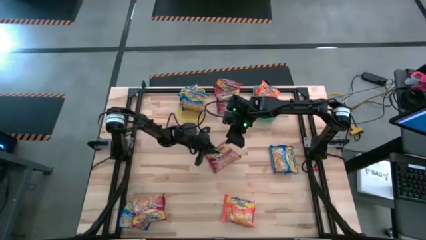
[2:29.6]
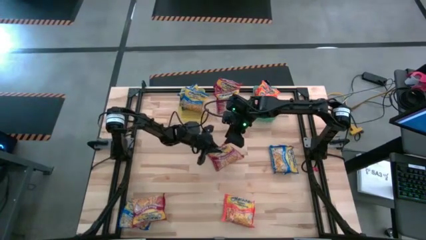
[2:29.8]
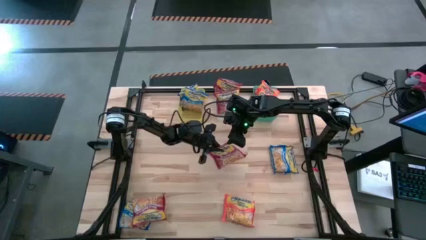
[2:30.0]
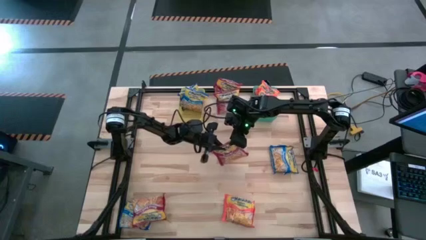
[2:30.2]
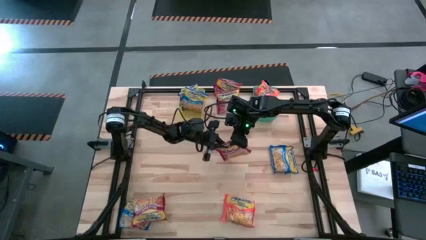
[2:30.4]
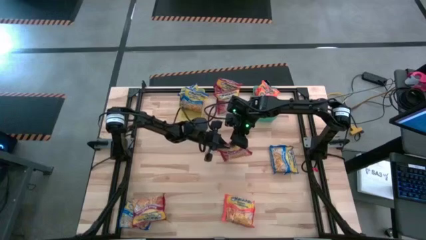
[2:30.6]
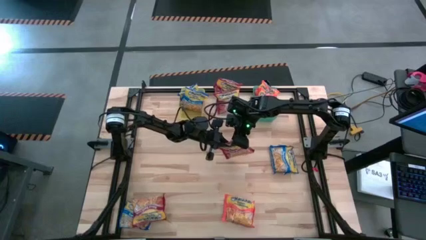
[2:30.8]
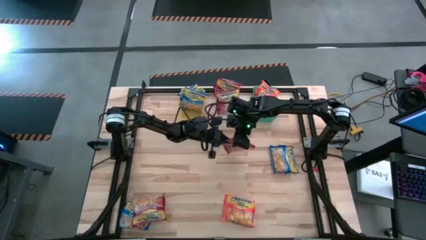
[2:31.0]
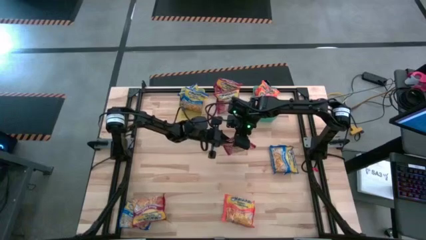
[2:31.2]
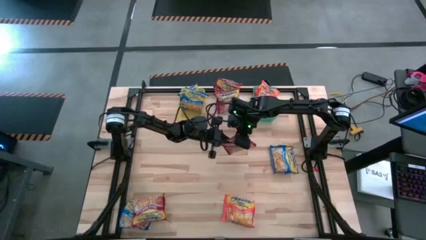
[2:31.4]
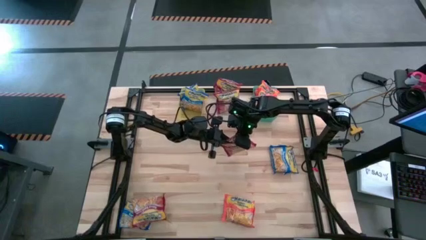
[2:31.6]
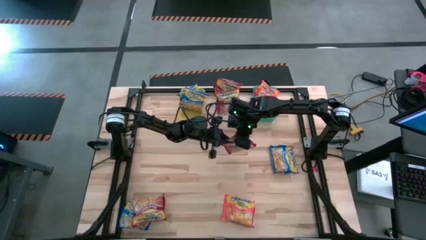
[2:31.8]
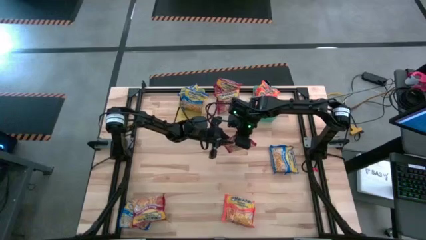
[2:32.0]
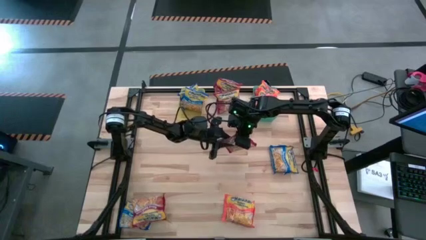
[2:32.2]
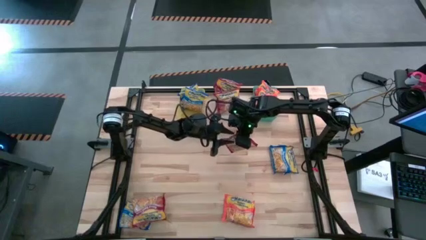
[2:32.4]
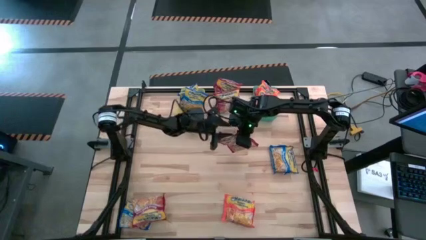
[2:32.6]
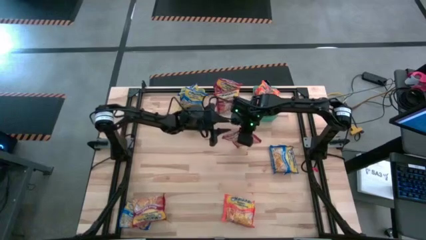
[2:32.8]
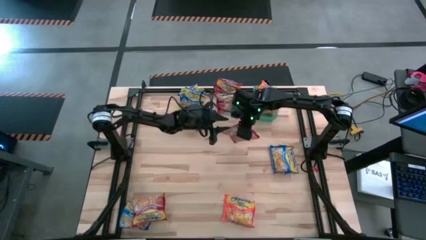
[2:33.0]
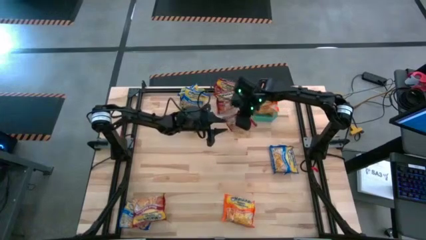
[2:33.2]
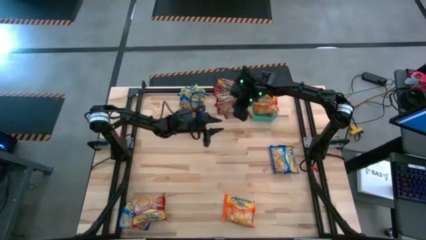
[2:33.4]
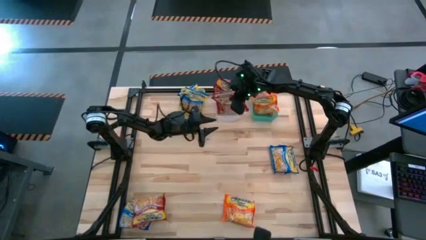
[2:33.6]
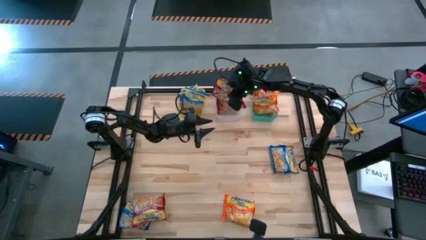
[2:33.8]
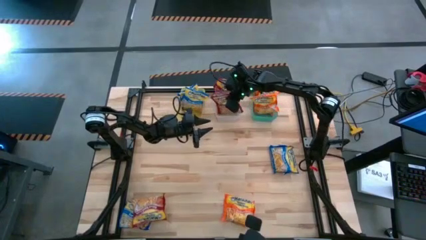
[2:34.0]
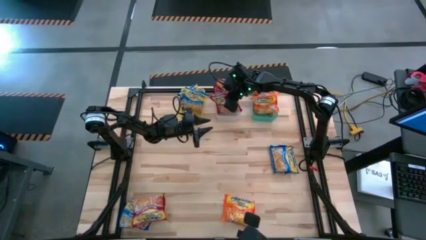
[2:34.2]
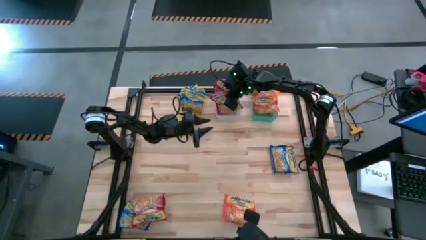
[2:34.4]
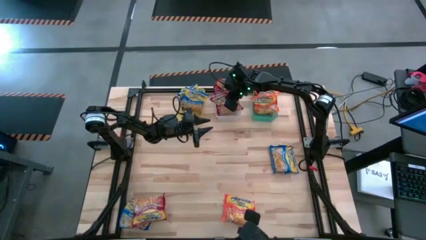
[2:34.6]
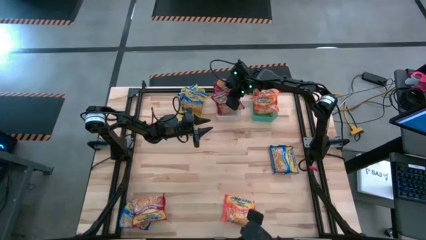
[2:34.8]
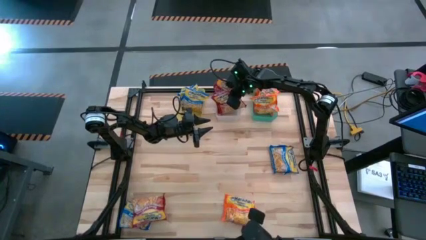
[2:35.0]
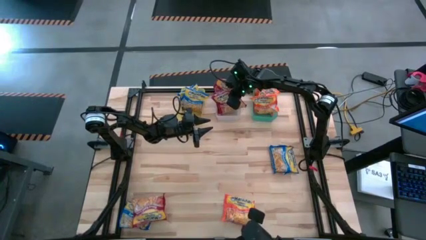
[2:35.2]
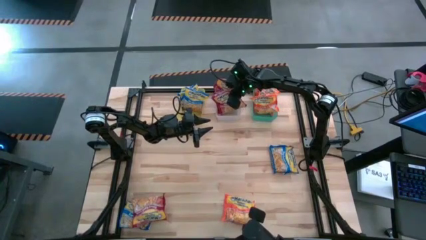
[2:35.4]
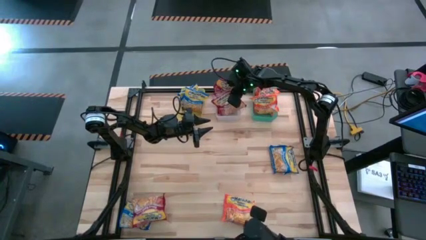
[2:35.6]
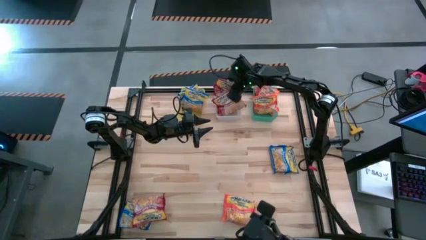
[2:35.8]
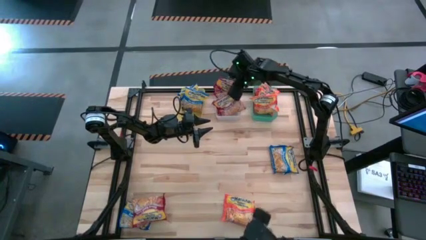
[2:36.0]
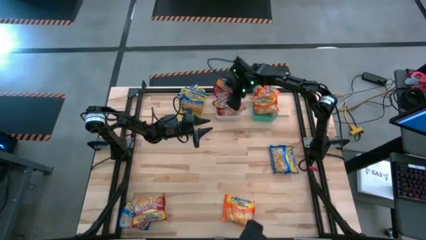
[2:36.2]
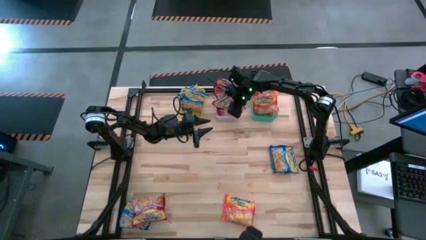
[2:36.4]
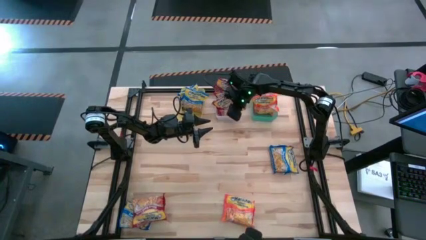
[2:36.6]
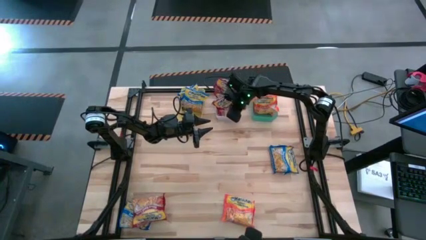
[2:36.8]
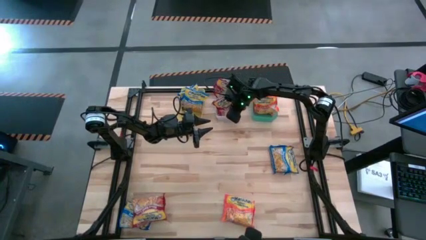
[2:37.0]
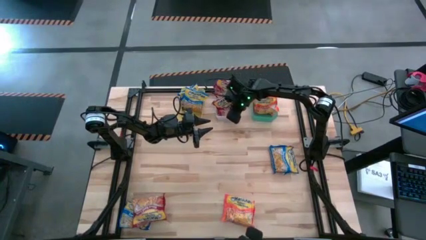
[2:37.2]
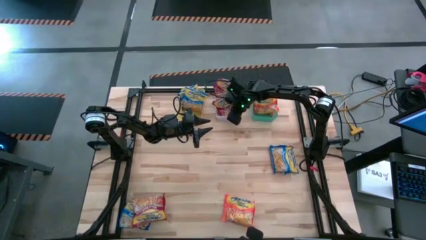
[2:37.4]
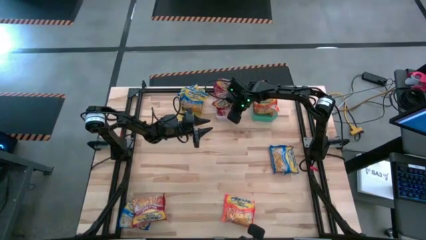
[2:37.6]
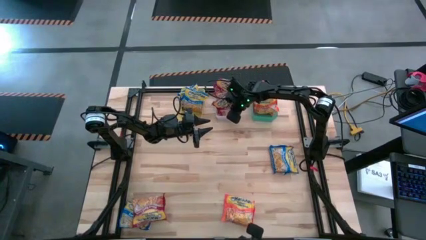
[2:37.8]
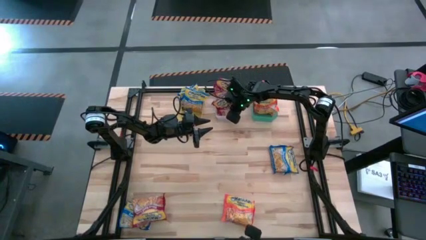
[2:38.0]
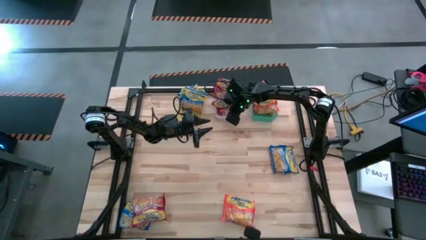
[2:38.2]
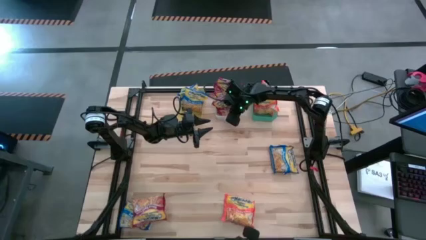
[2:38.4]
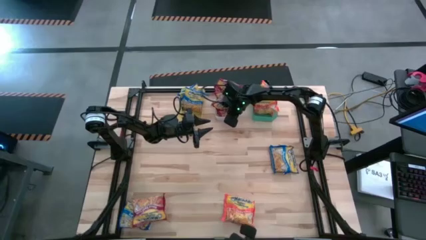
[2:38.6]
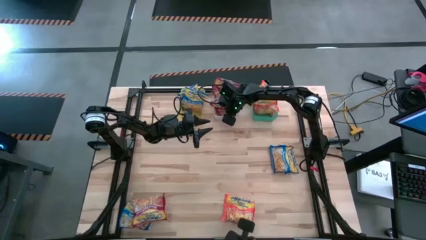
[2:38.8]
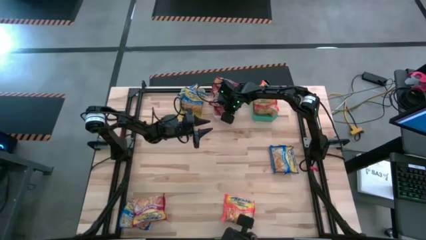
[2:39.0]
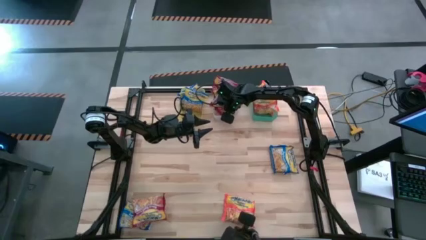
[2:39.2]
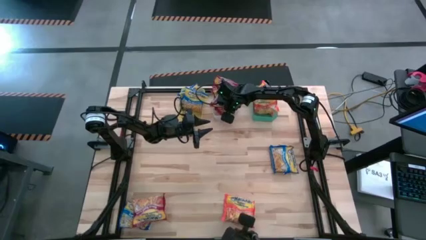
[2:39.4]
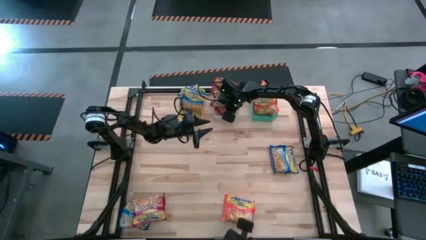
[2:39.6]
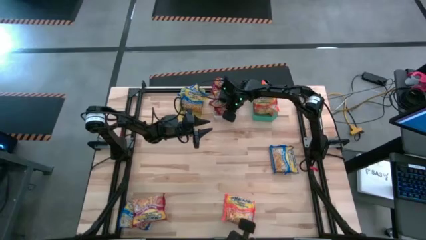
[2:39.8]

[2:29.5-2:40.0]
Task: Sort Maruchan noodles
Put the right red noodle pack into the white bin

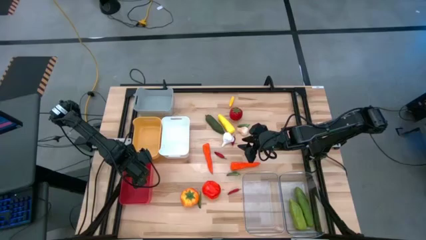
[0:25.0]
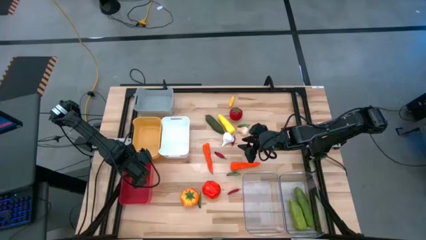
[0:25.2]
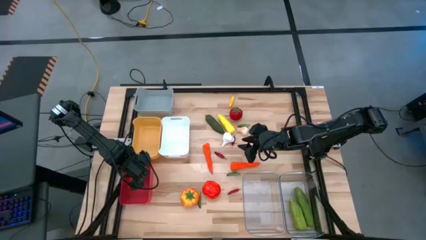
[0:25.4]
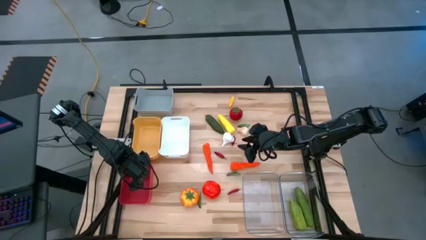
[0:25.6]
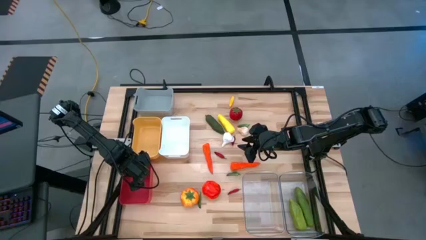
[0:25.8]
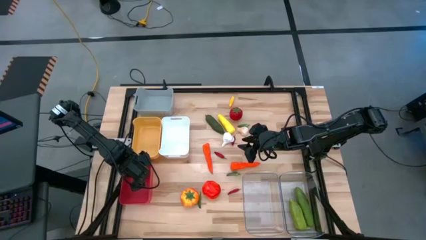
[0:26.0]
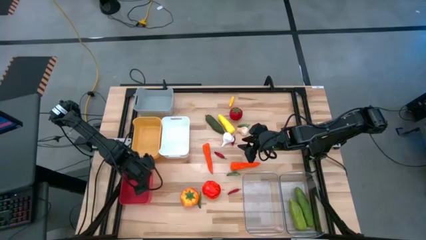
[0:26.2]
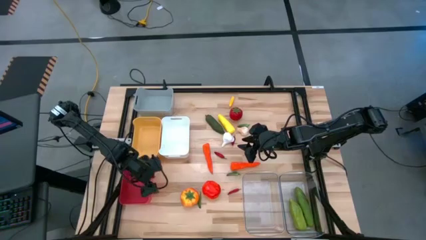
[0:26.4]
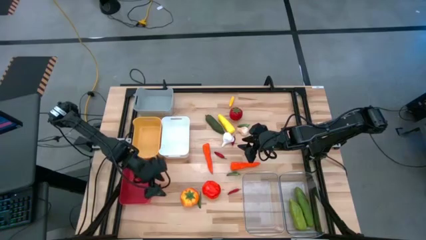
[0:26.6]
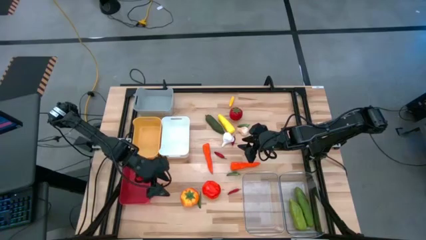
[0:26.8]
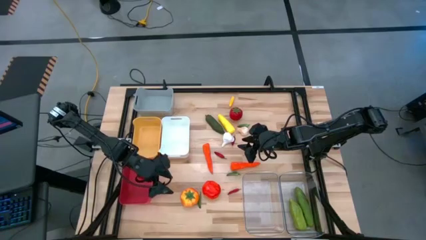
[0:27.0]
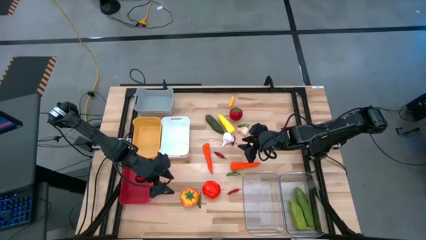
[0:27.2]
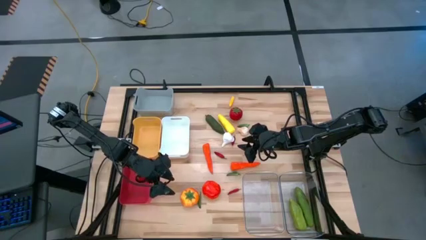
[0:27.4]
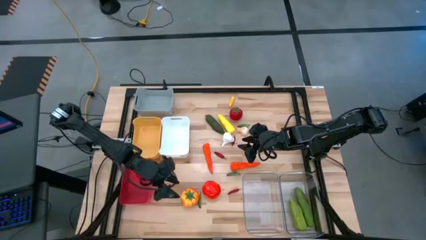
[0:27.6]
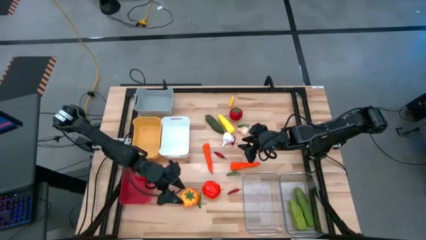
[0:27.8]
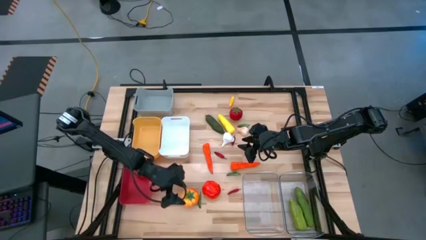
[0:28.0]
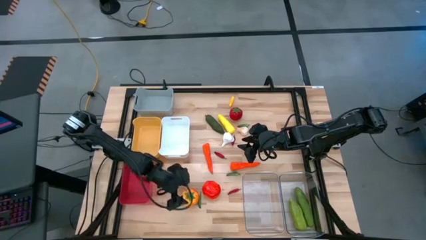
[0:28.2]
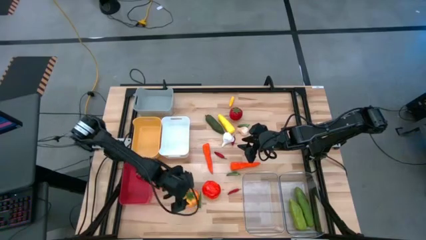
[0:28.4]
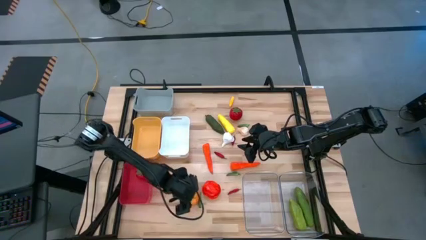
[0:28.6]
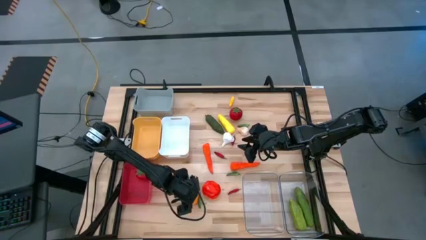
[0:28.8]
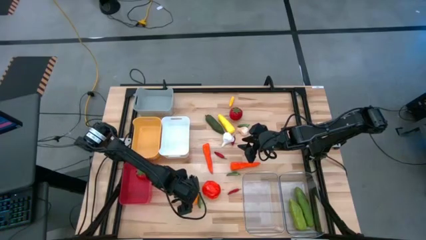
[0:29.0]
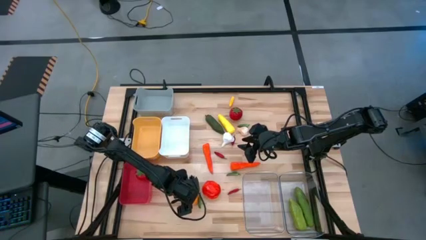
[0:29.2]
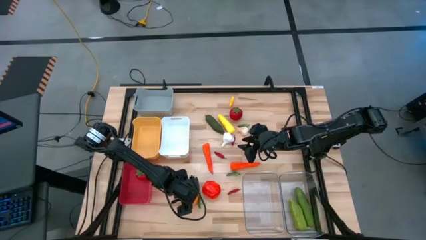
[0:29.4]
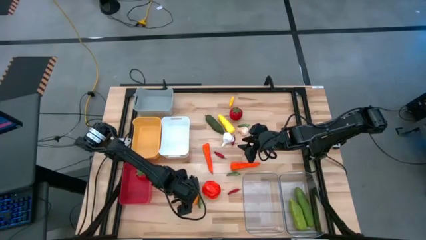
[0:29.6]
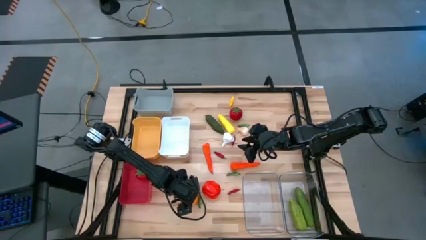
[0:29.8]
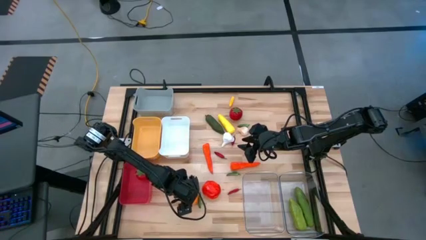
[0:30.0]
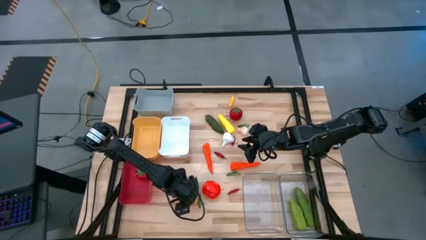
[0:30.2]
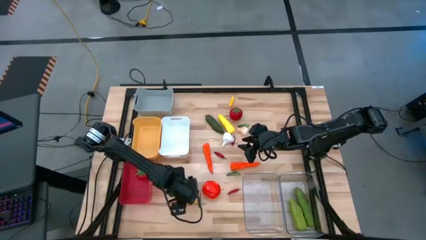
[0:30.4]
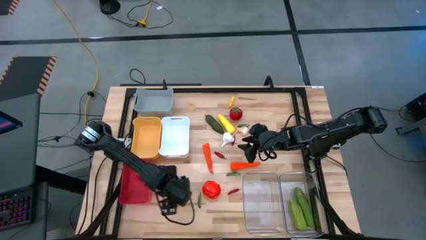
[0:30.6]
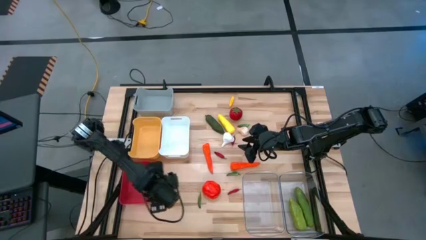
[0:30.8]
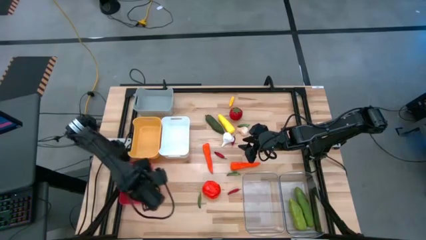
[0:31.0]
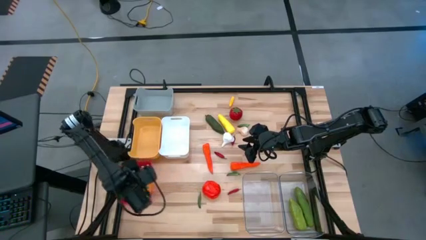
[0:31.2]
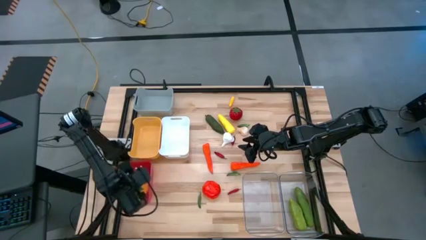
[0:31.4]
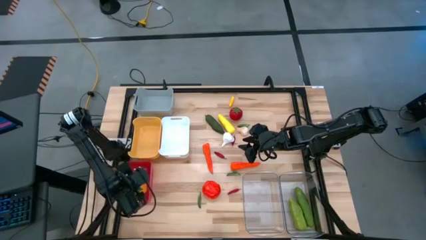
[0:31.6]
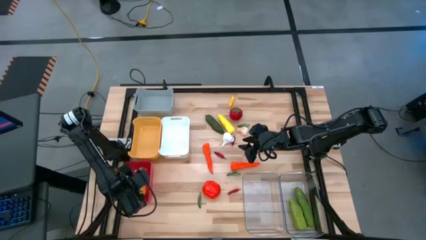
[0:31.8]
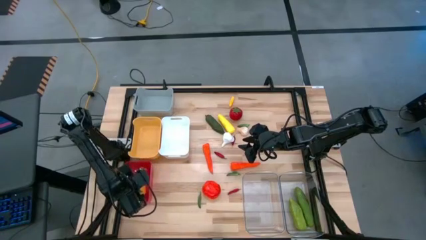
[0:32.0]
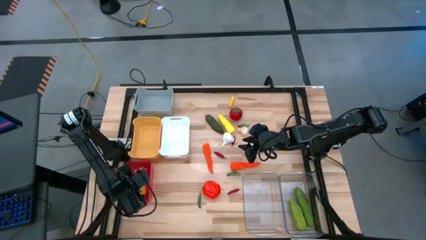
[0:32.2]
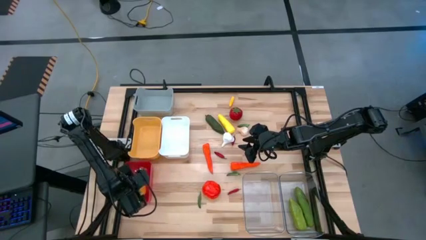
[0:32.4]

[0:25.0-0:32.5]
Task: Sort produce into baskets
Put the left orange tomato into the red bin
